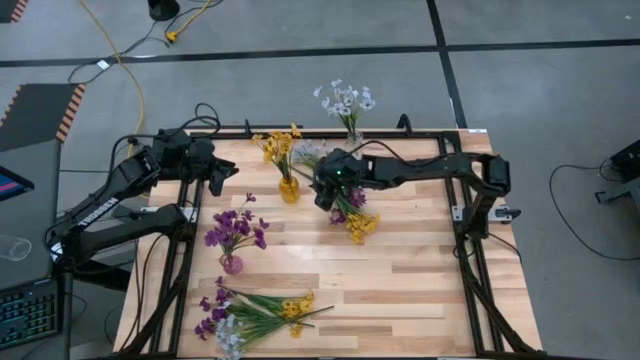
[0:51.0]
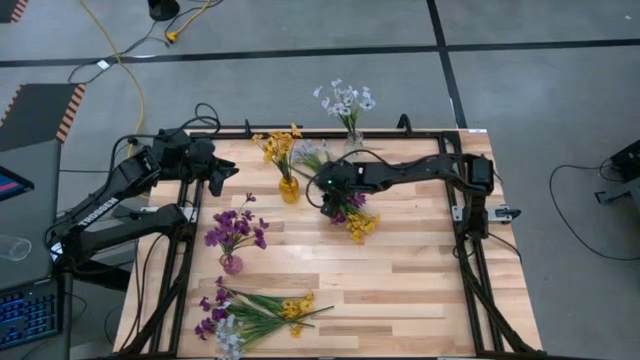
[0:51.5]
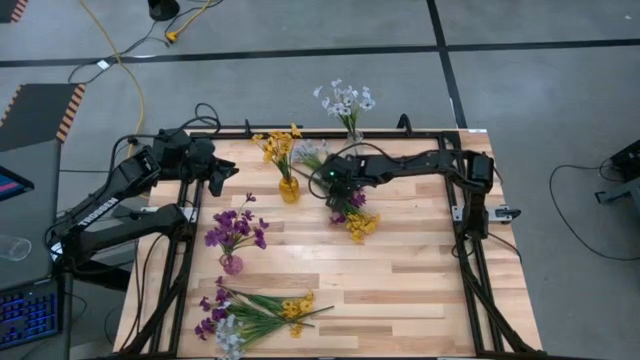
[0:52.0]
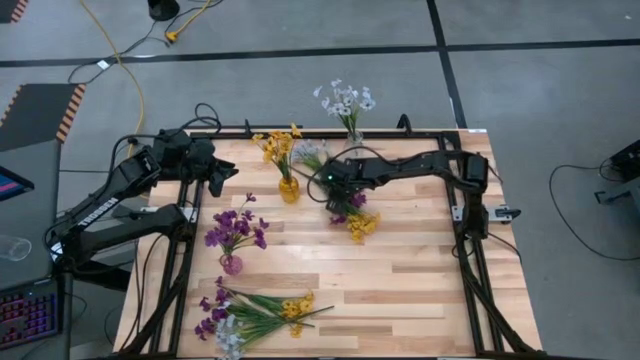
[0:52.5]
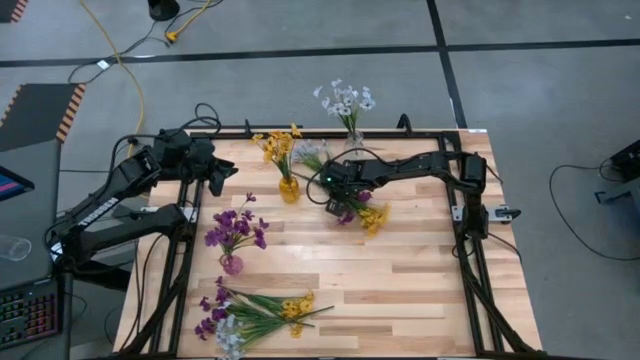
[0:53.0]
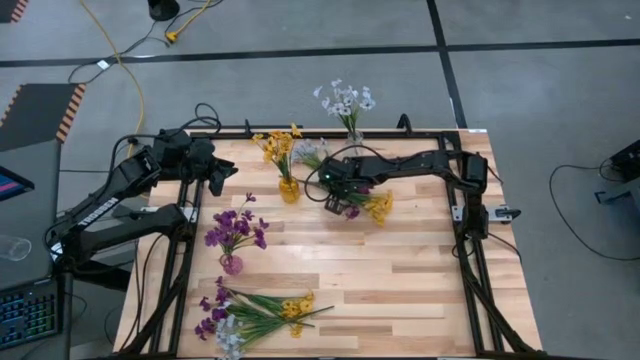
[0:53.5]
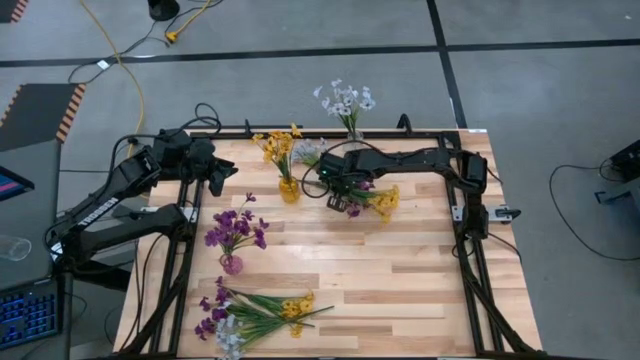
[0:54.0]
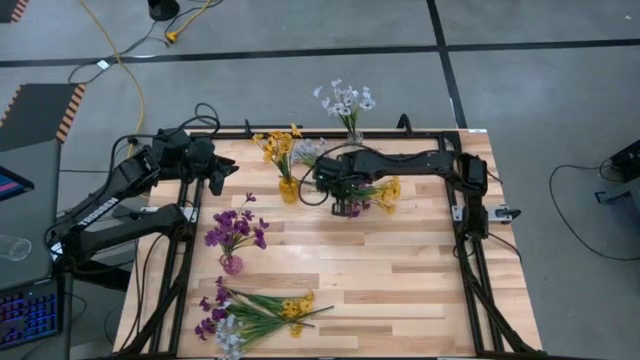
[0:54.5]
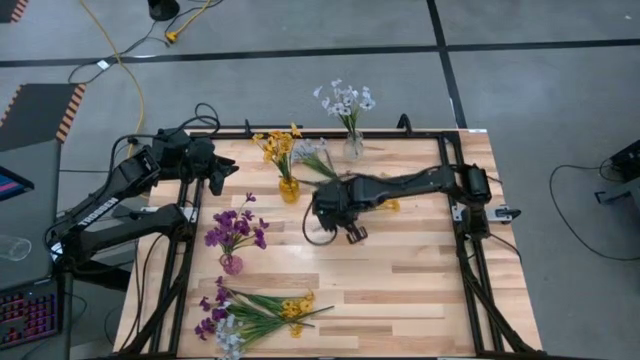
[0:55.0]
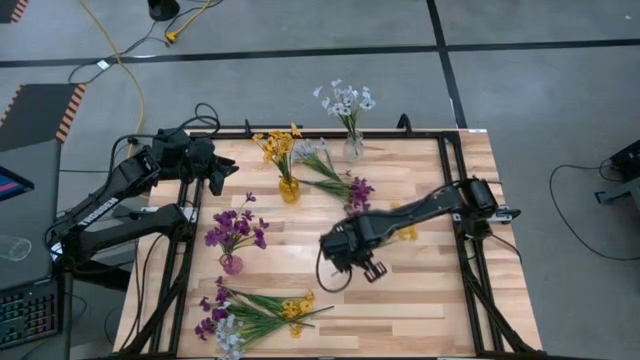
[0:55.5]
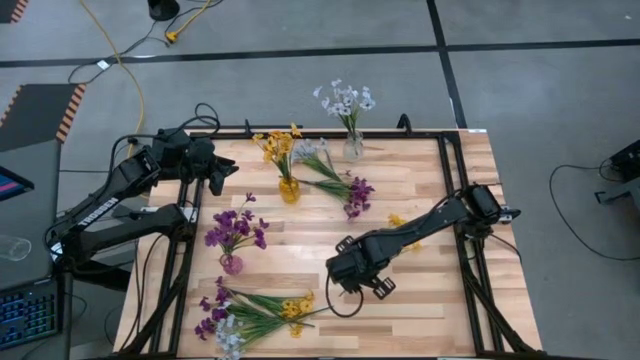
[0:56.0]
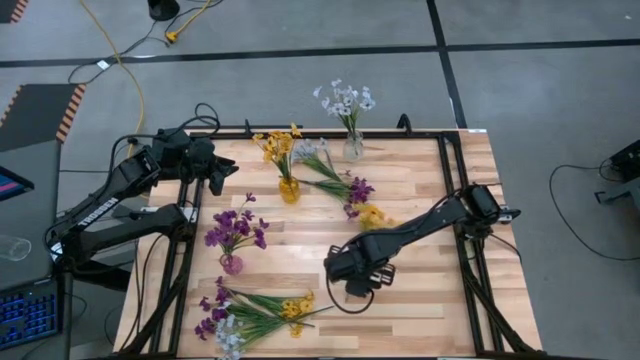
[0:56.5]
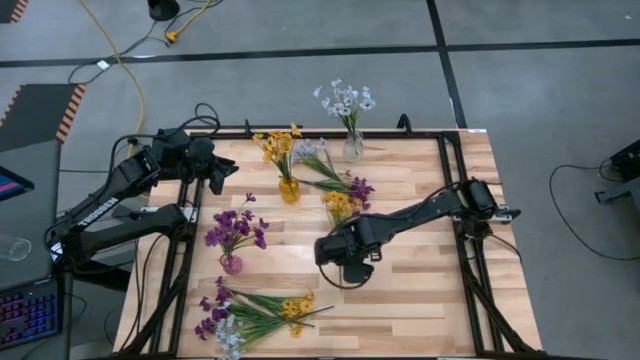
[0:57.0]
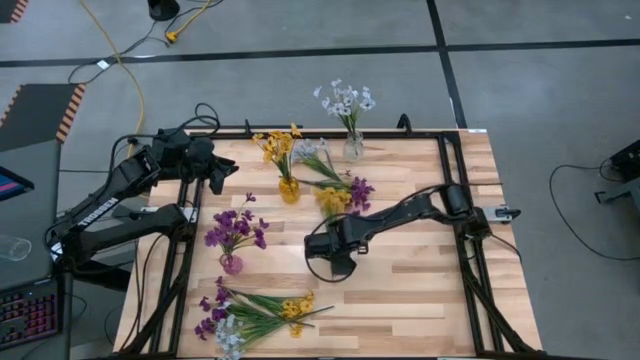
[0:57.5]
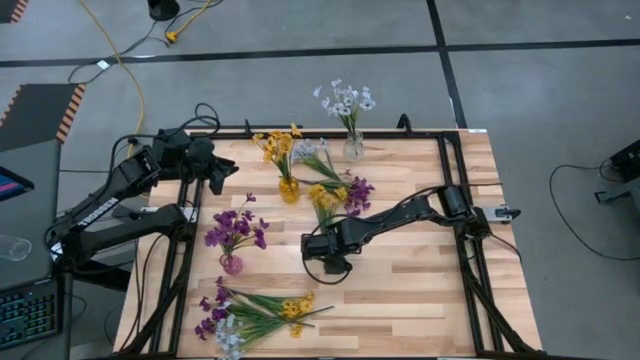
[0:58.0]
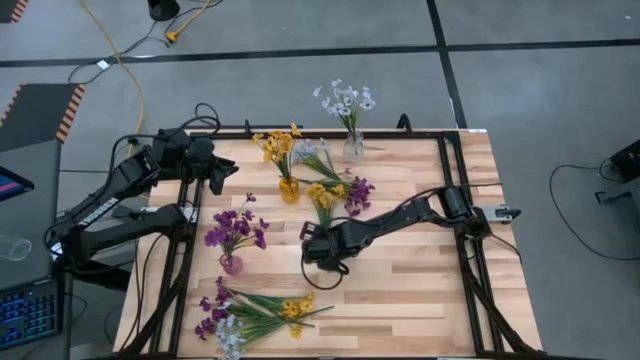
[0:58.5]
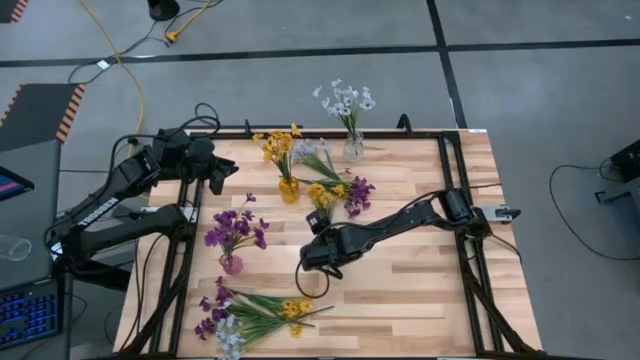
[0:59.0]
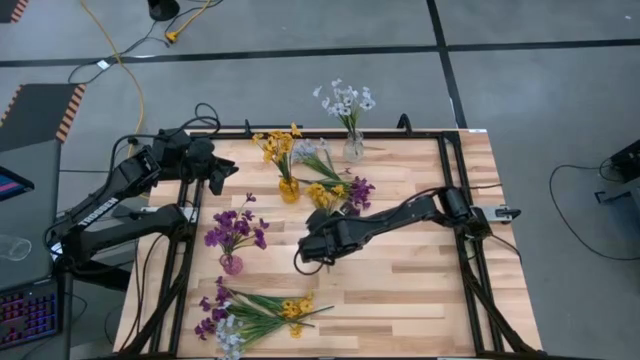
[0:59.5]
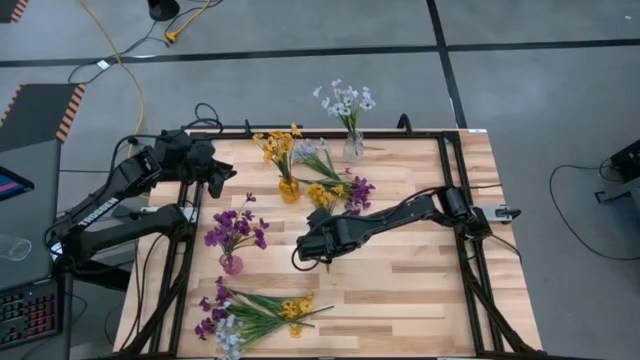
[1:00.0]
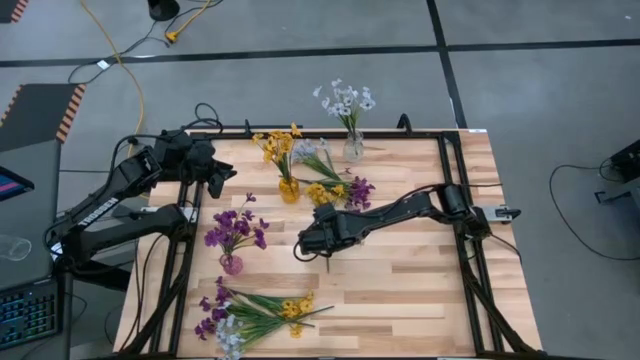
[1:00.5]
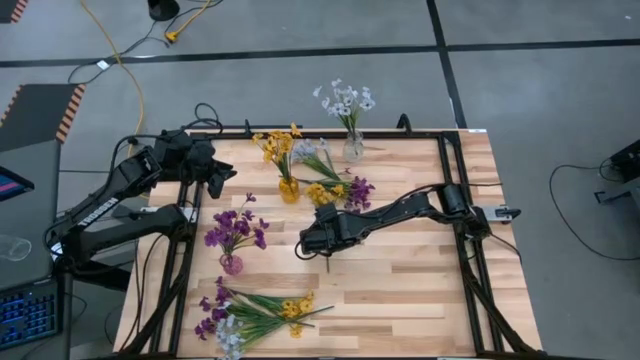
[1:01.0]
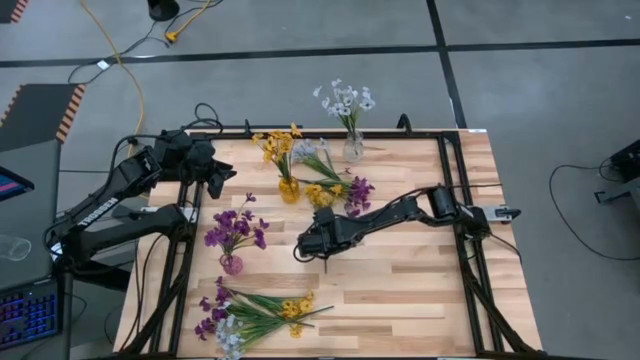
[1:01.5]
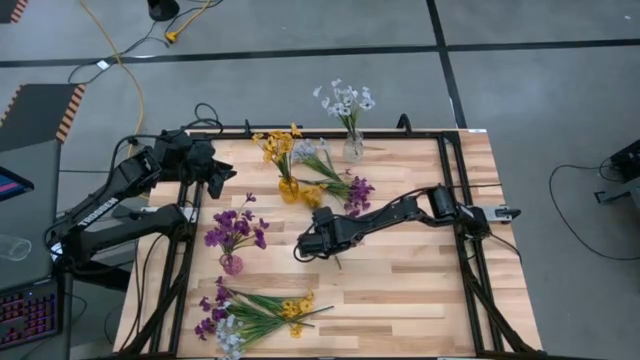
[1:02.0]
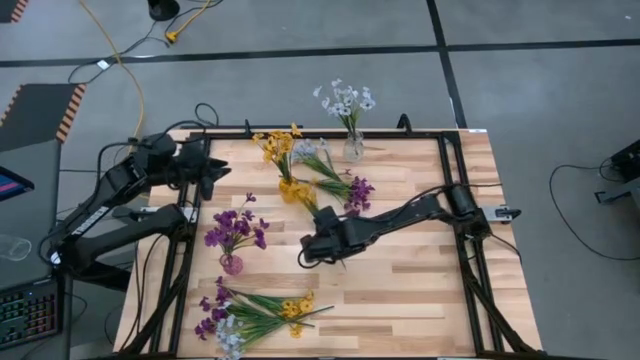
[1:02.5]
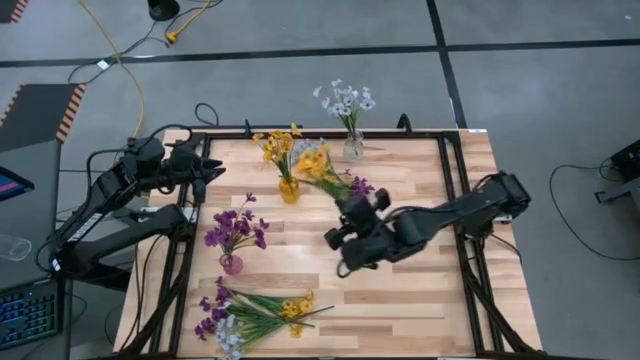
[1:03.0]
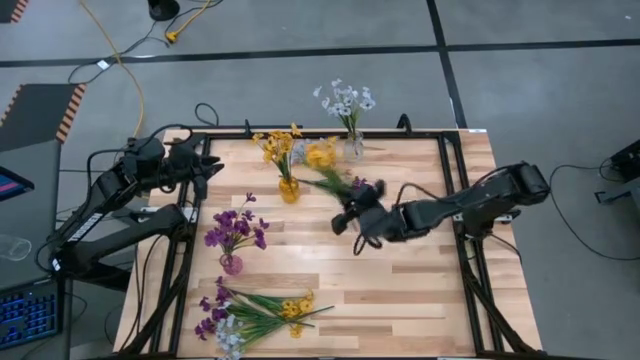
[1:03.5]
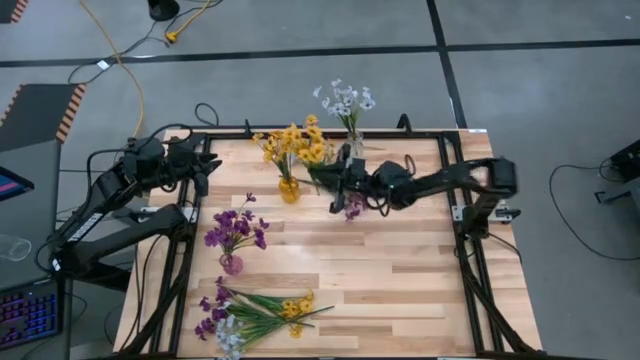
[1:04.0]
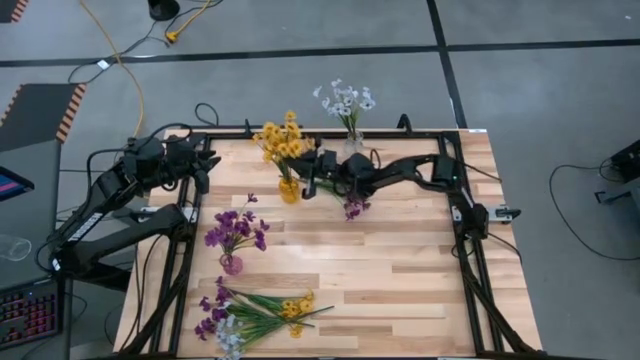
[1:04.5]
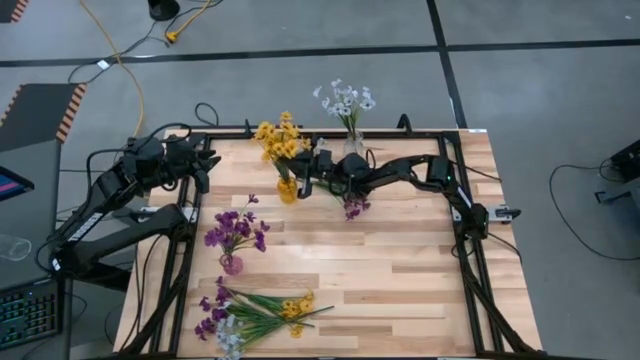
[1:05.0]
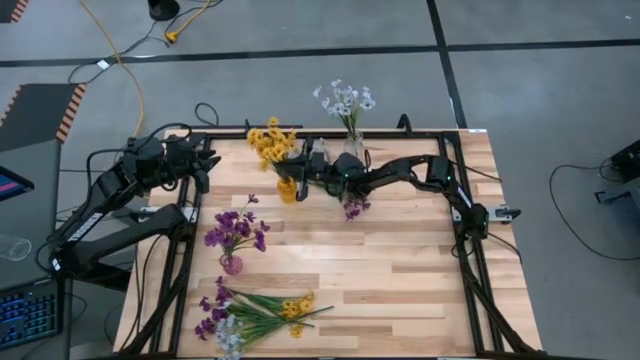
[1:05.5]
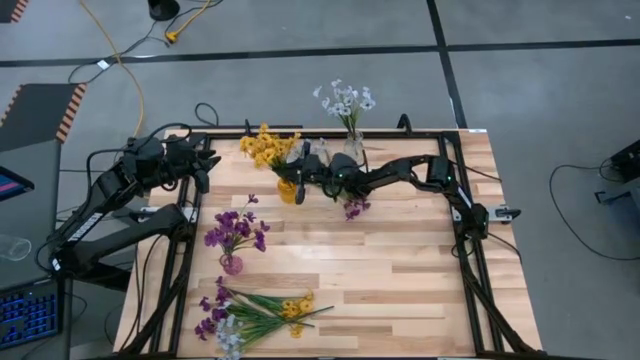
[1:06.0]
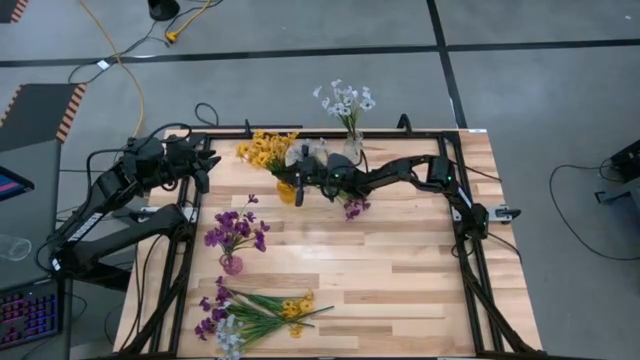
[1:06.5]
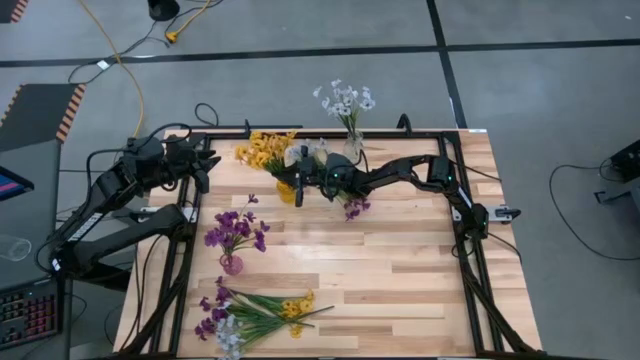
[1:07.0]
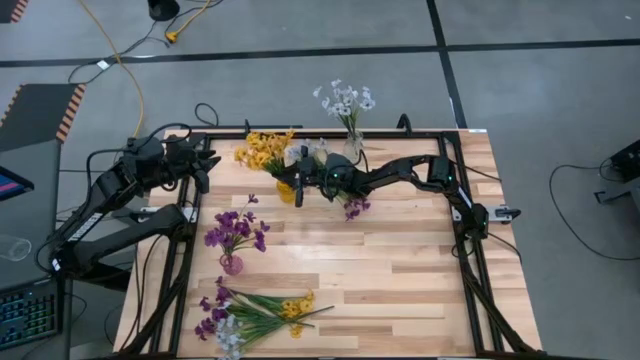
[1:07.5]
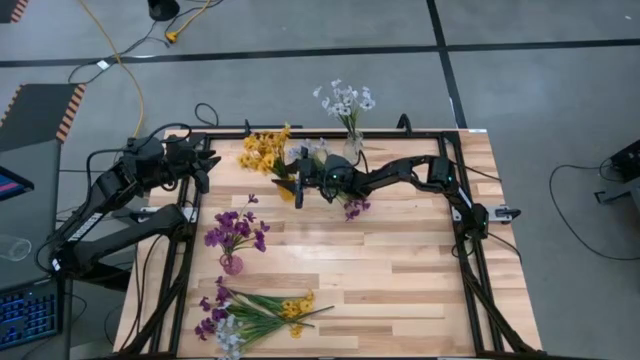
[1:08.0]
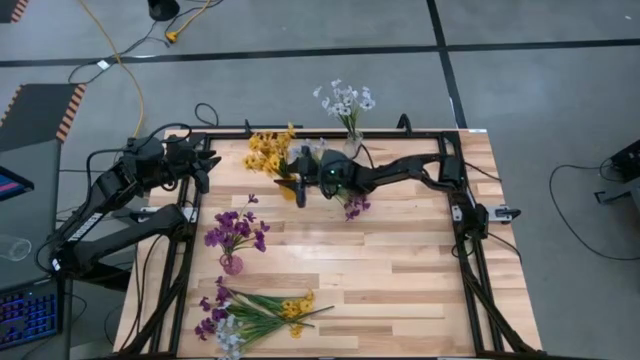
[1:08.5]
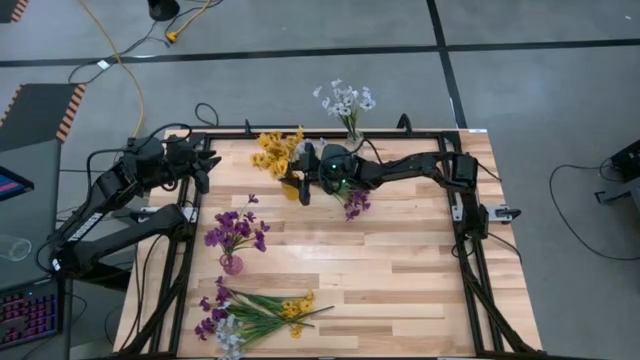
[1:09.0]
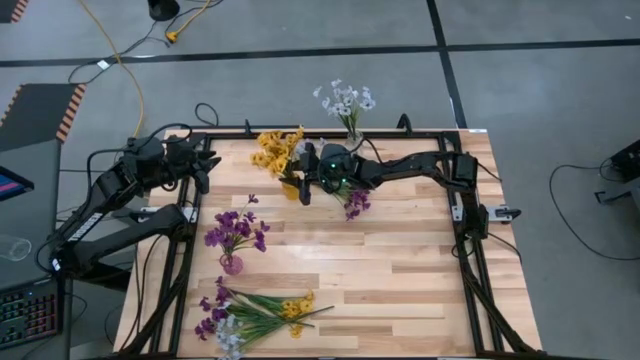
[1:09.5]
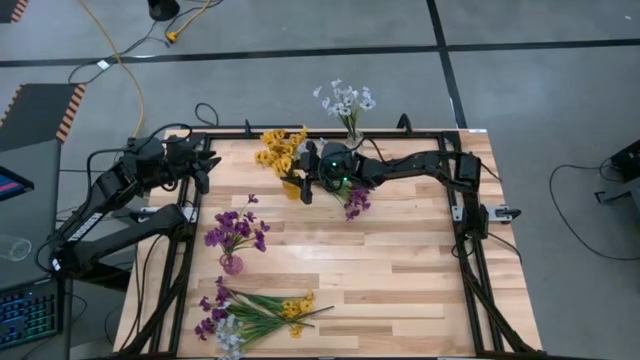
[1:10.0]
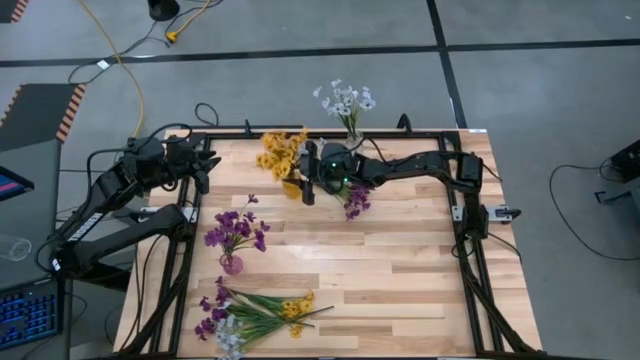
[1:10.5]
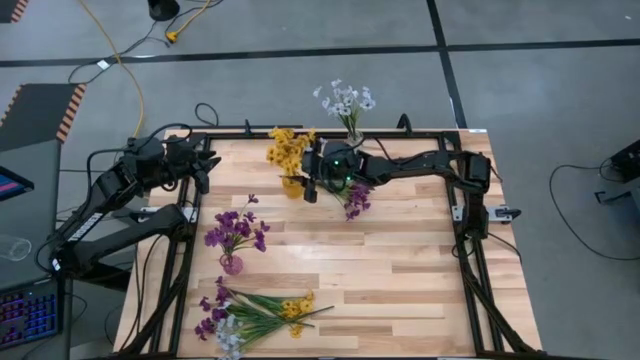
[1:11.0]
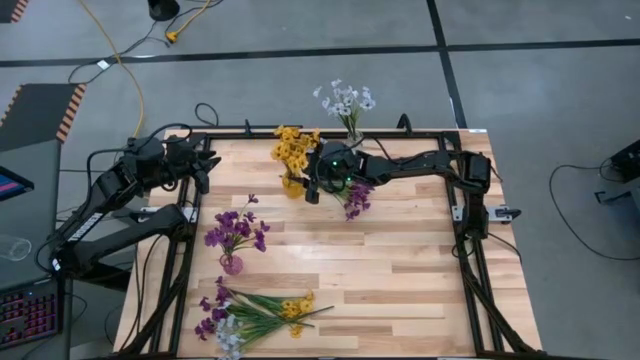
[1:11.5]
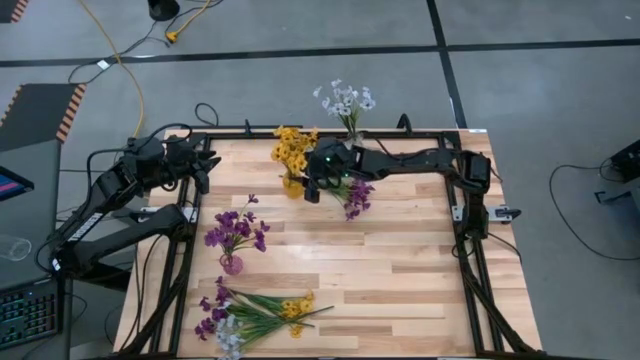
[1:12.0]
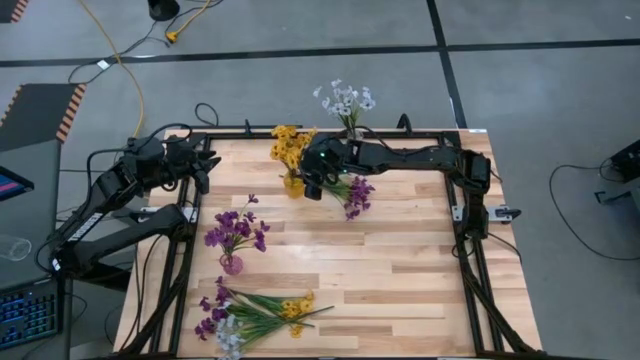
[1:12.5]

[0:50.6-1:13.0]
Task: Sort flowers into vase by color
Put the top yellow flowers into the yellow vase
